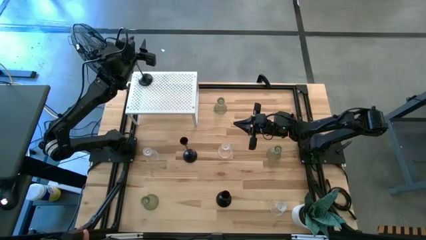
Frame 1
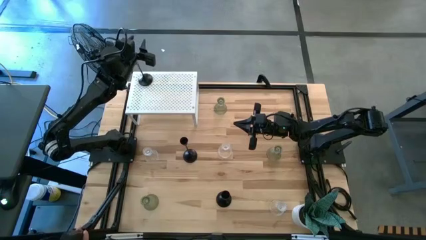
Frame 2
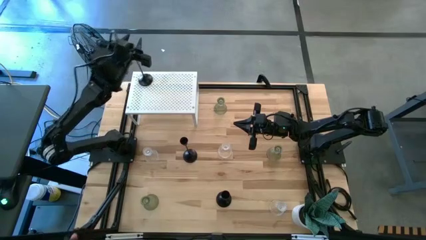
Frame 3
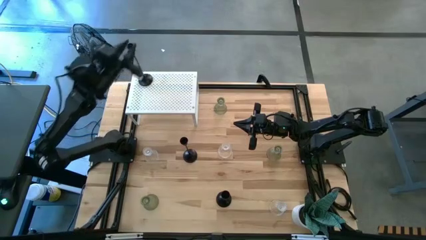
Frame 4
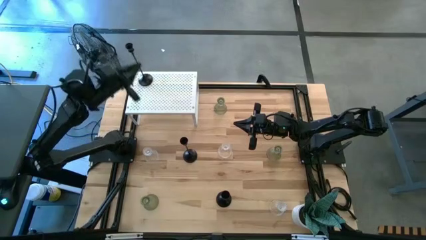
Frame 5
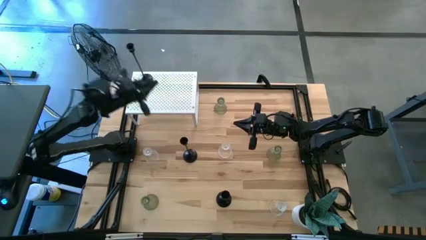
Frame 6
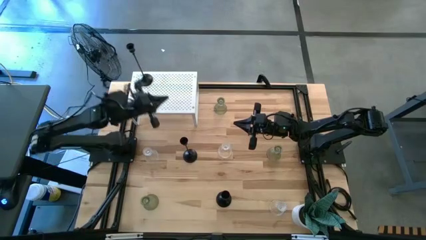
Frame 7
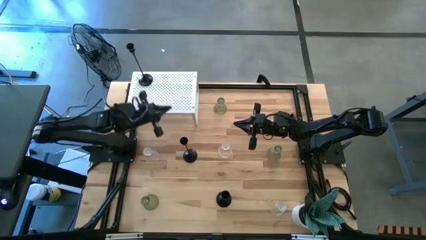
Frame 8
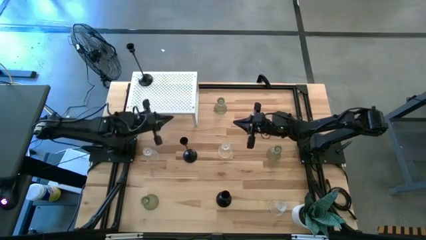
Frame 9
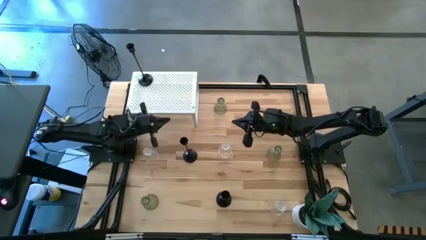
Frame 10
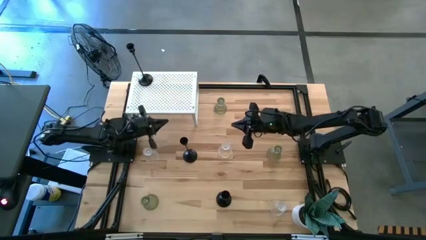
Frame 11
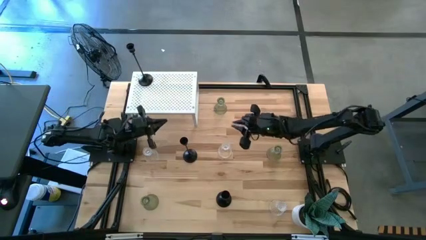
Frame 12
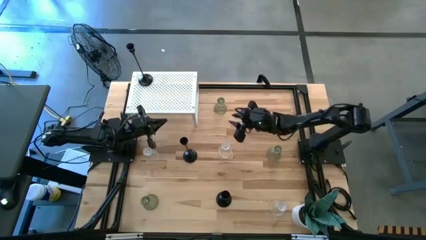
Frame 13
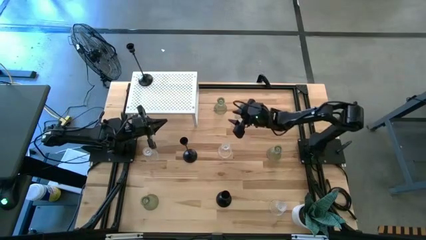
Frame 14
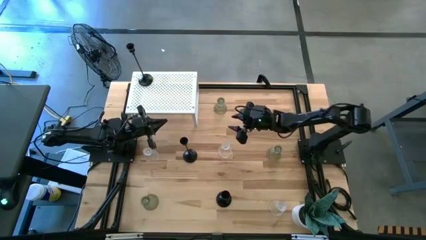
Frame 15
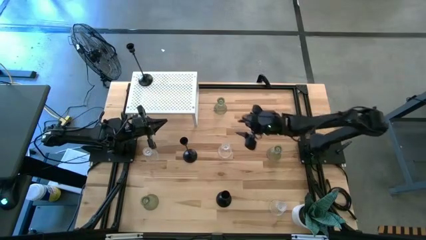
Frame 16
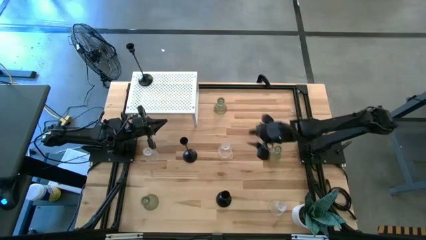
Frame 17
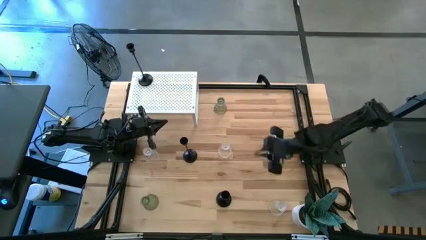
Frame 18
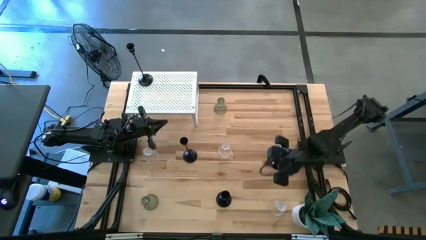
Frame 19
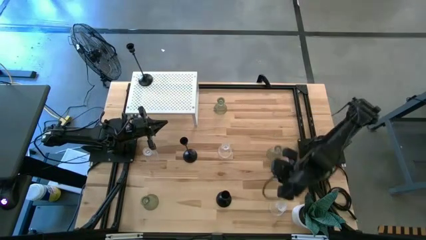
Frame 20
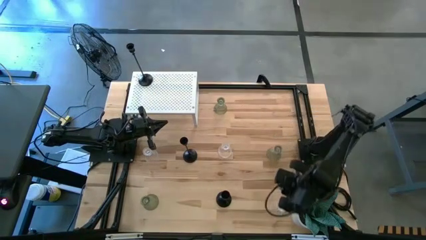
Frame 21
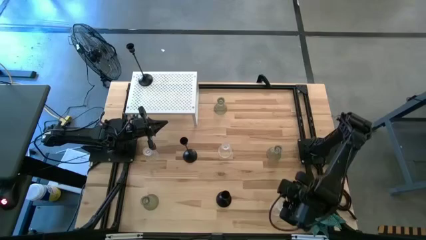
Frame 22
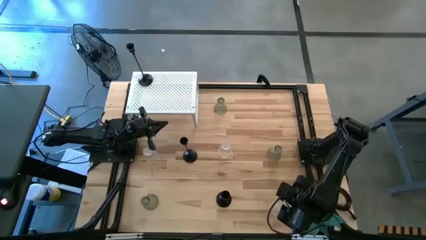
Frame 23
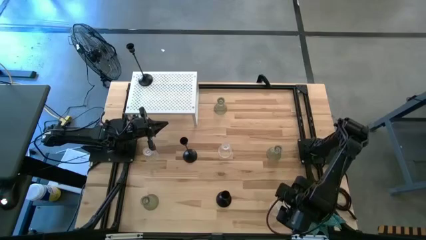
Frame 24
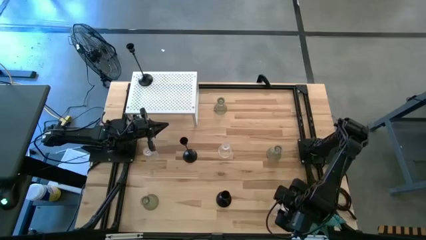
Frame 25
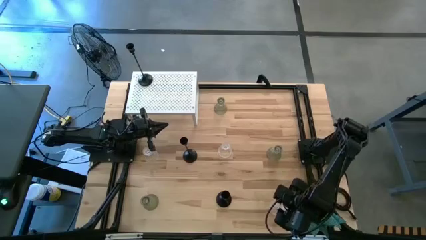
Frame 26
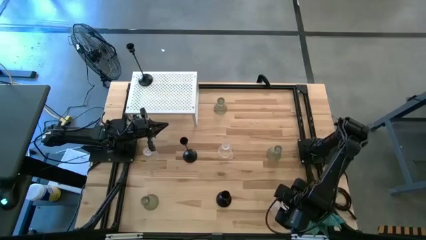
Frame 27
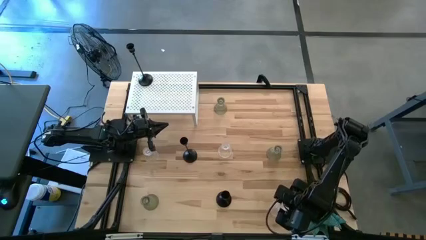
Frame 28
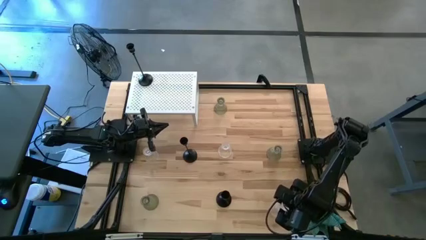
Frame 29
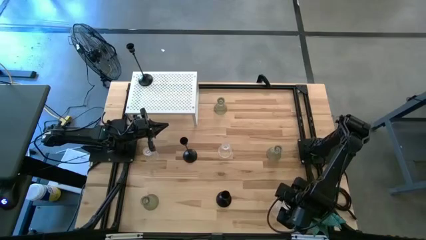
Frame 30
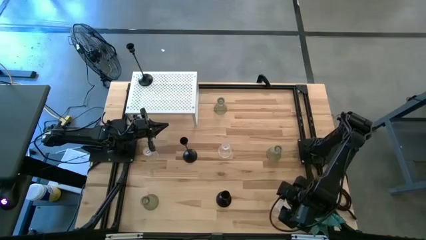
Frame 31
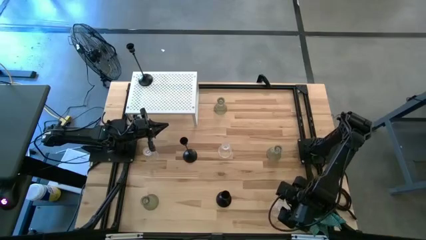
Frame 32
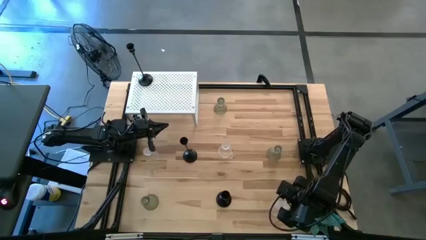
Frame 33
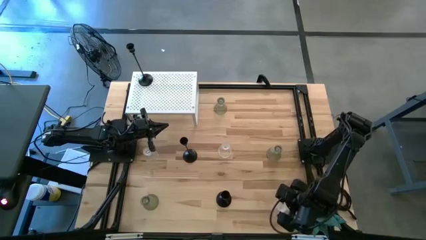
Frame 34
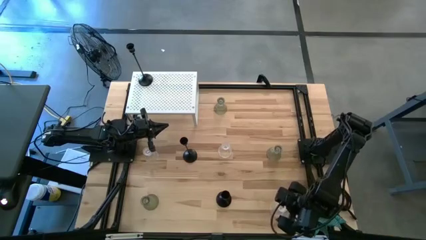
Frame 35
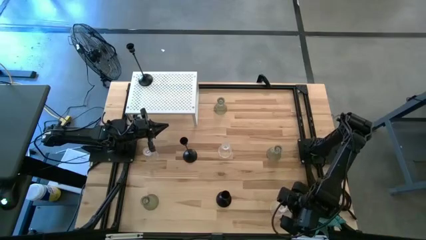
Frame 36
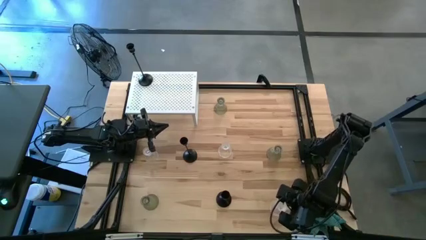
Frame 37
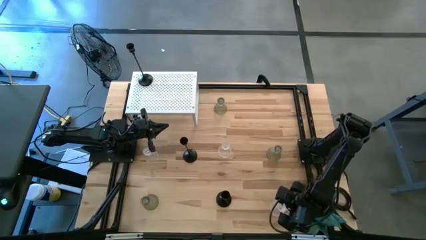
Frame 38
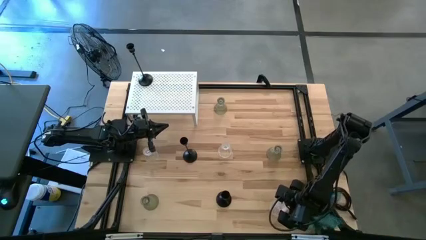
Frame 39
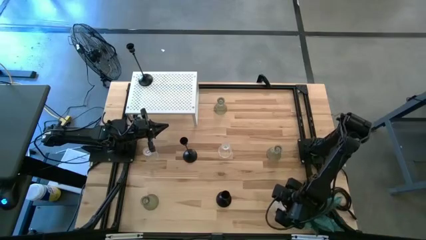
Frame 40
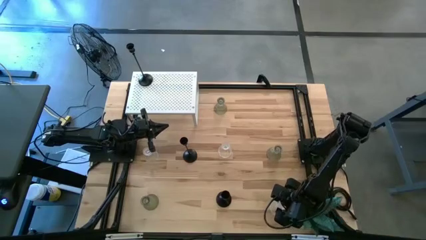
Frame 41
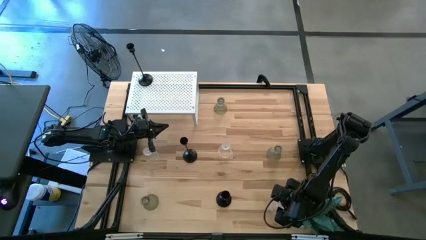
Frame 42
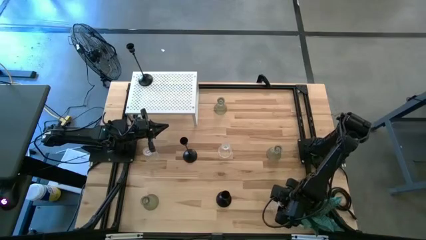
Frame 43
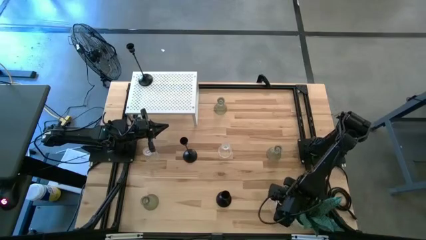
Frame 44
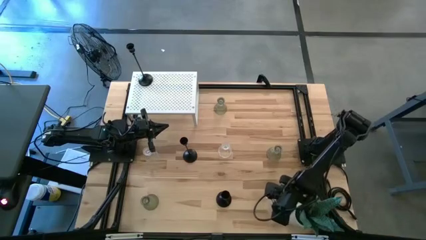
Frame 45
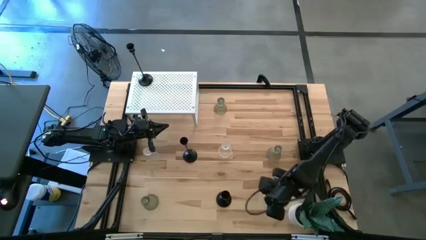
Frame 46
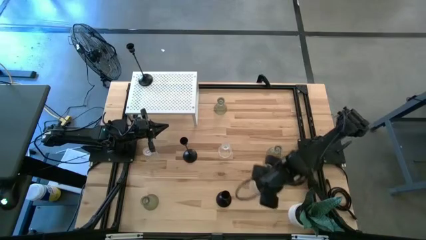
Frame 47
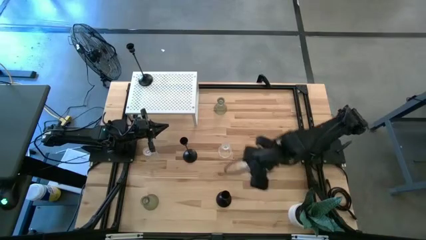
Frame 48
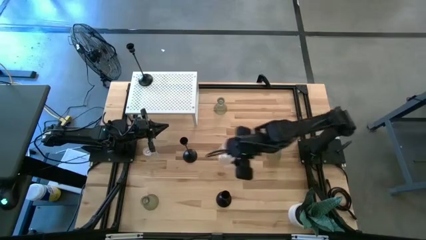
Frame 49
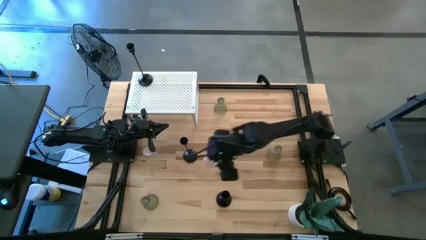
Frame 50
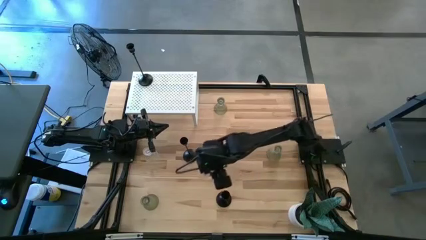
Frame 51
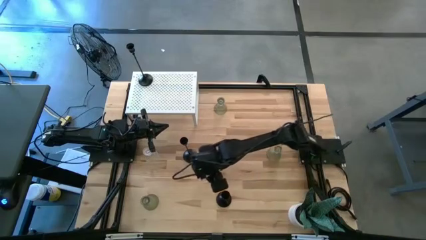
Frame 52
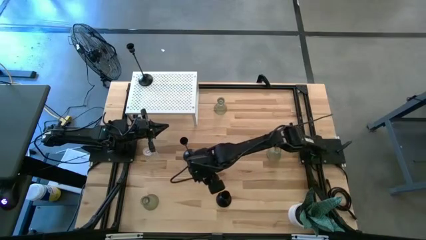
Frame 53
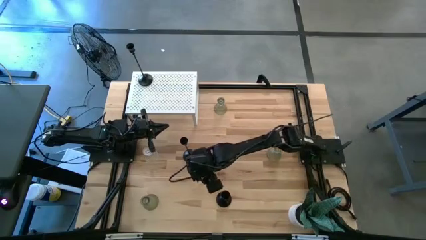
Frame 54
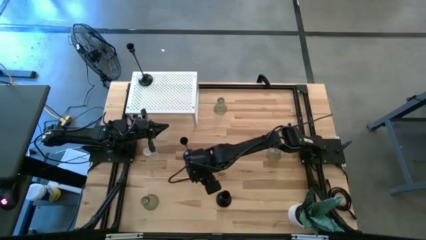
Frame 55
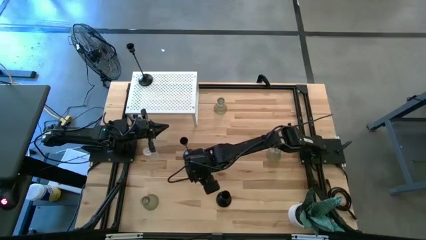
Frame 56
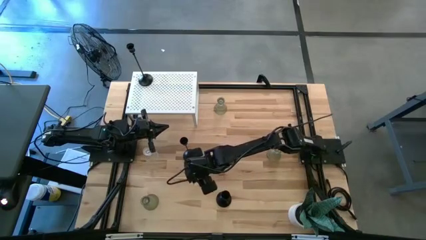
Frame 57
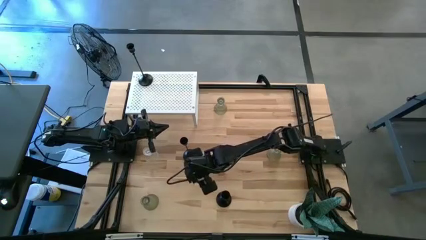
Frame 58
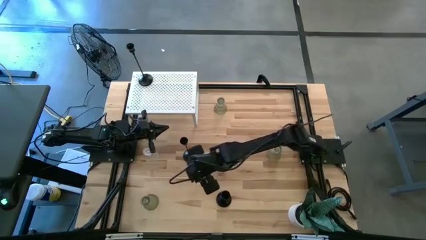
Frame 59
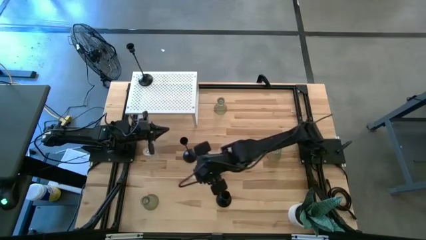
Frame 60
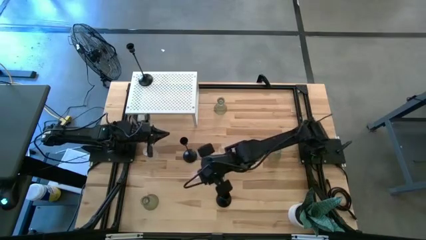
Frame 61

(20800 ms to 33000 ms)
Task: Pick & Place candle stick holders
Put the bottom transparent candle holder on the shelf
